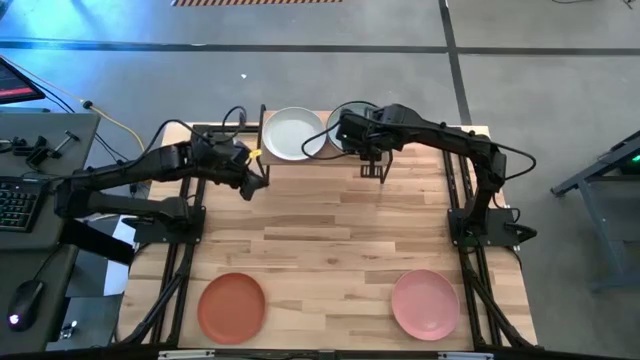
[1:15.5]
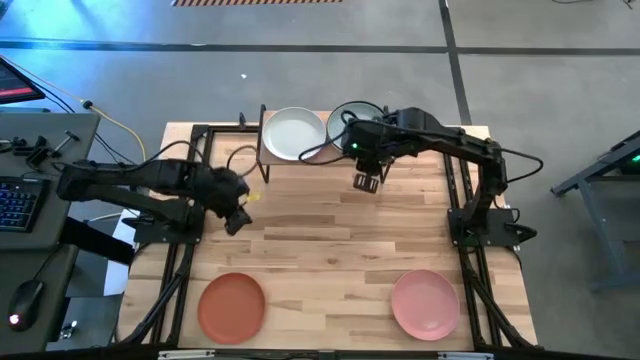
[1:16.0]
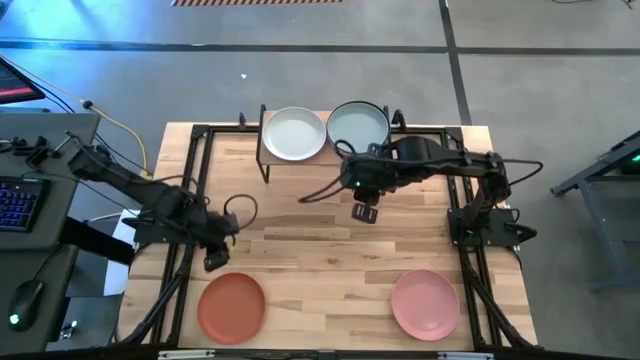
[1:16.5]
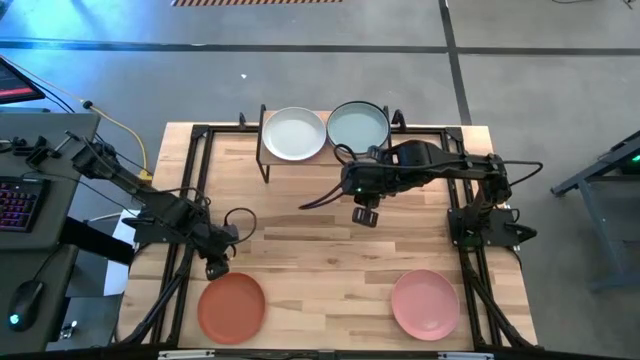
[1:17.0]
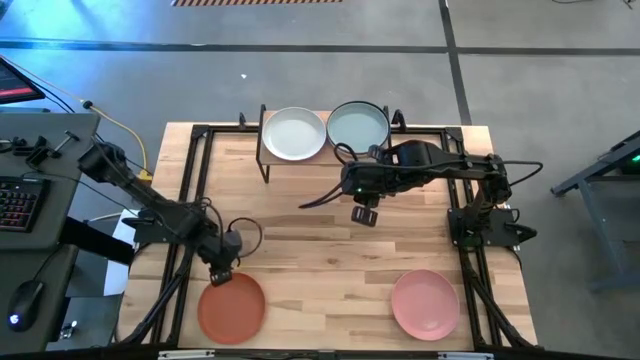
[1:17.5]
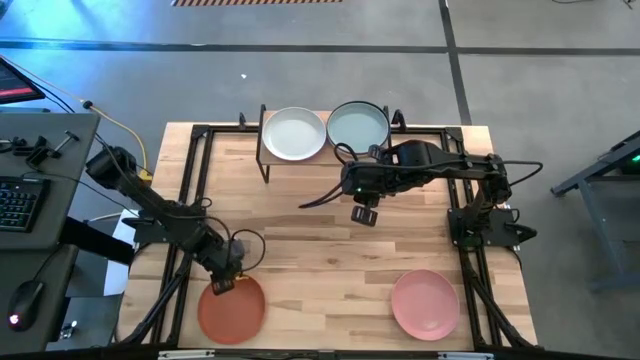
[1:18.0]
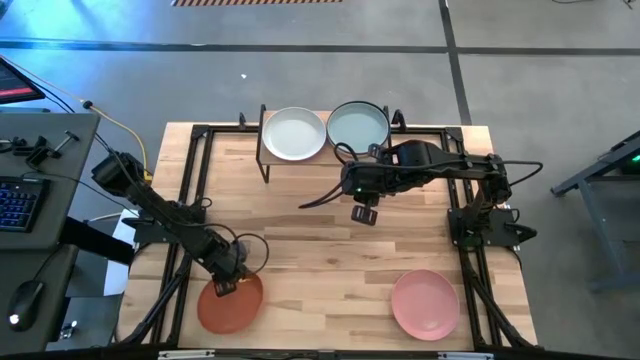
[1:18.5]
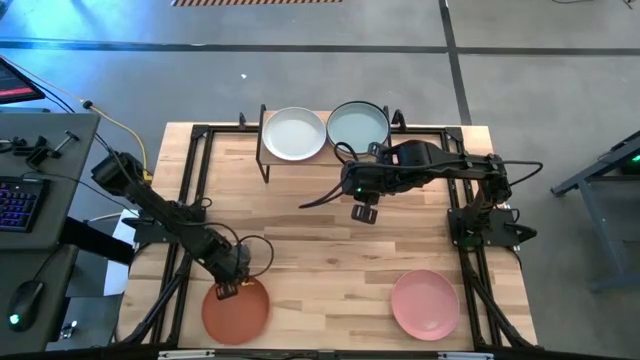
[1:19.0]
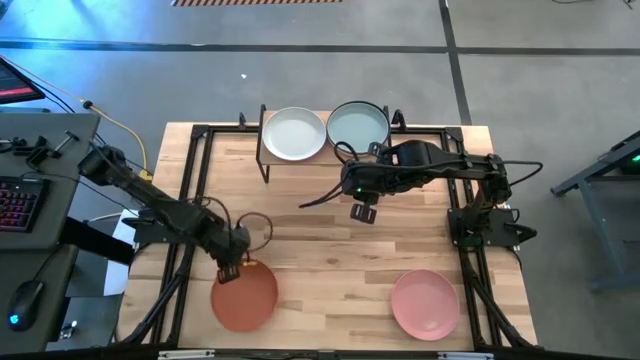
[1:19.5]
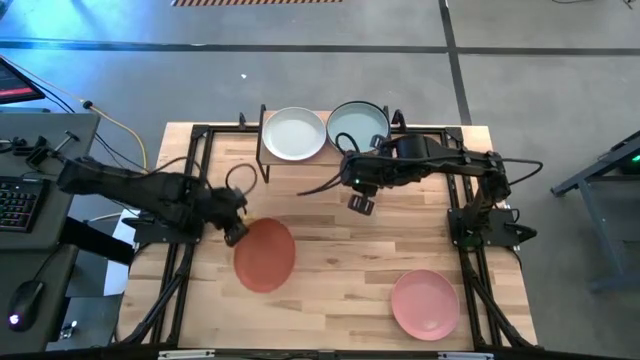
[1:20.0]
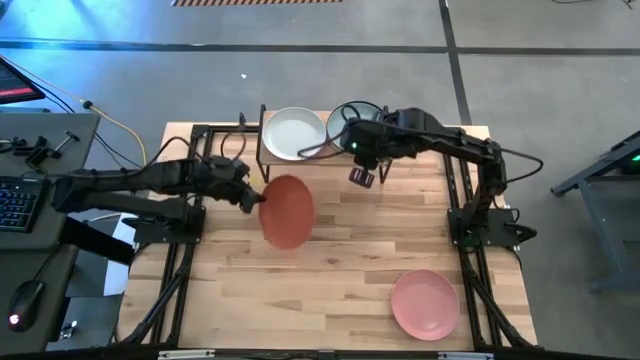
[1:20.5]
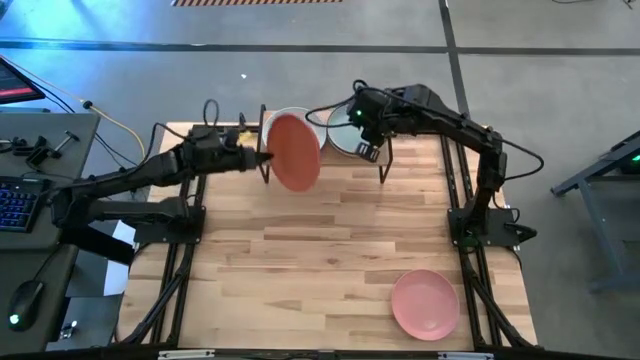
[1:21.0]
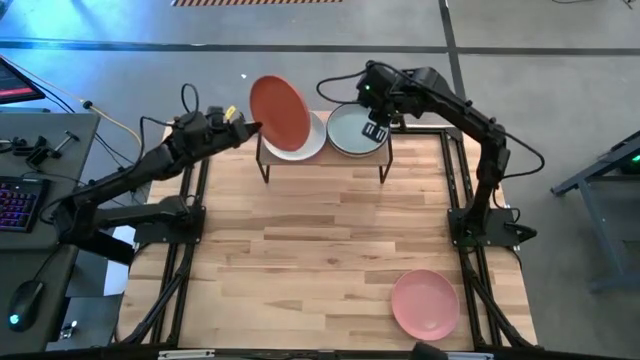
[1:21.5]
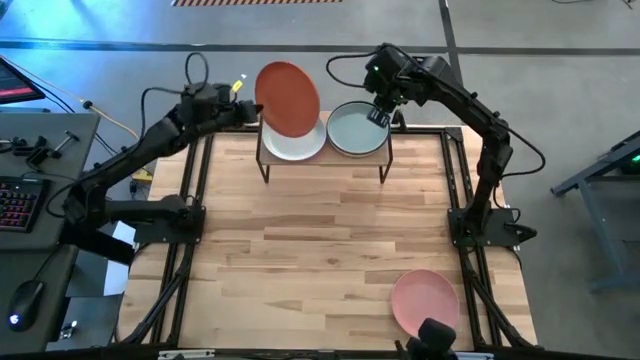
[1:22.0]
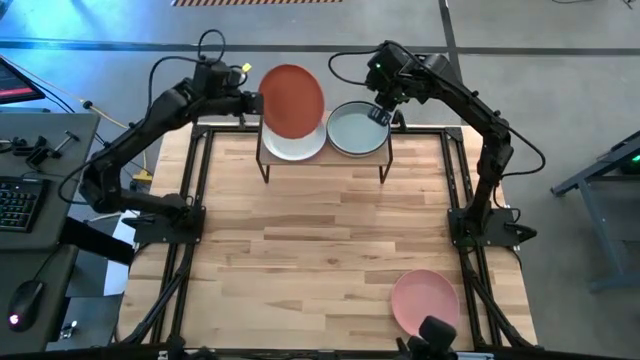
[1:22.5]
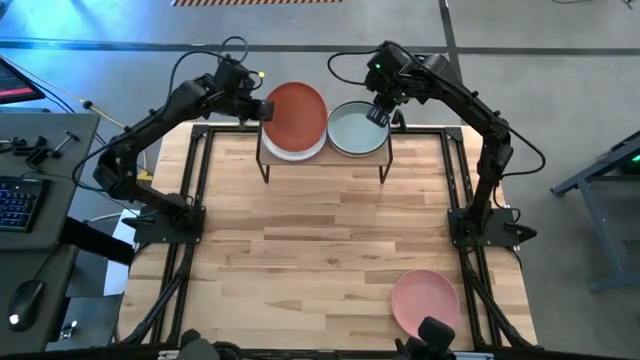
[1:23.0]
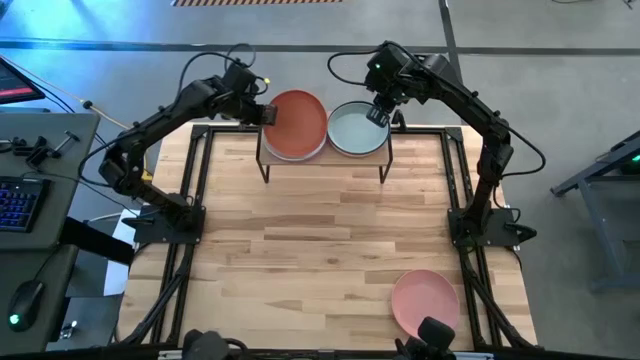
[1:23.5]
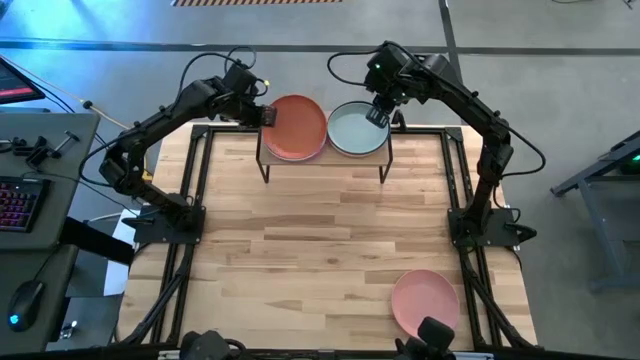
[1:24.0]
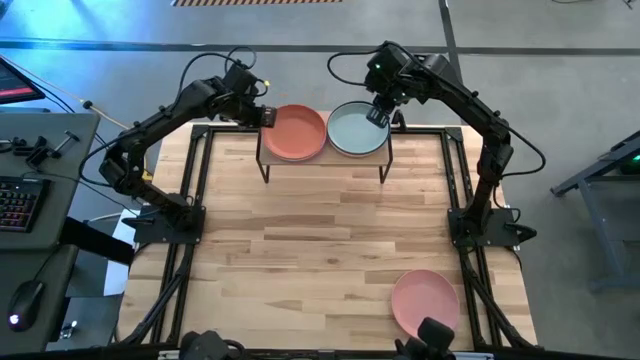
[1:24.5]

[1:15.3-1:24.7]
Task: Place and stack plates onto a shelf
Stack the orange plate on top of the gray plate on the shelf

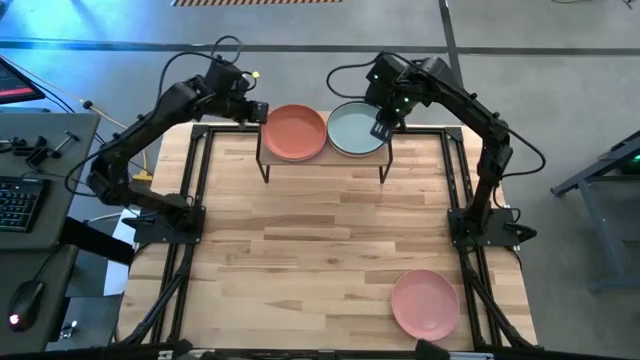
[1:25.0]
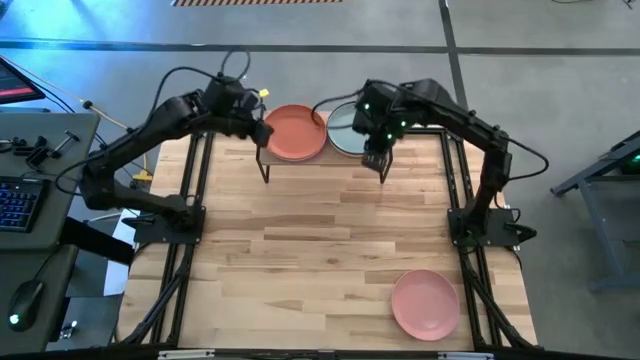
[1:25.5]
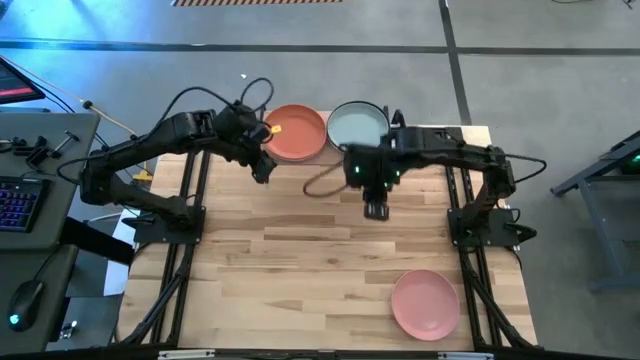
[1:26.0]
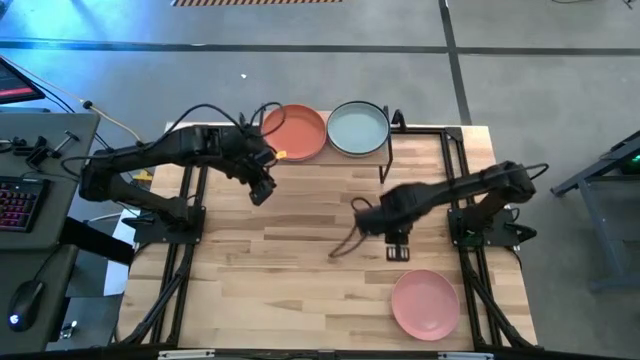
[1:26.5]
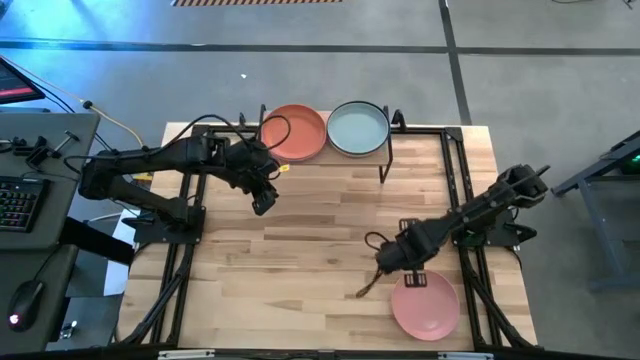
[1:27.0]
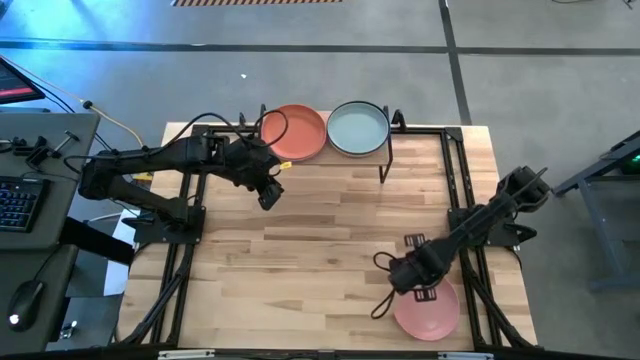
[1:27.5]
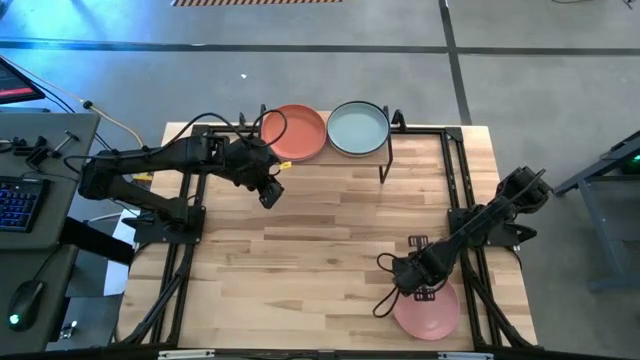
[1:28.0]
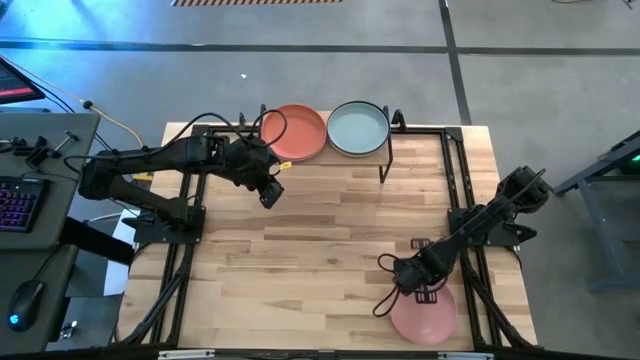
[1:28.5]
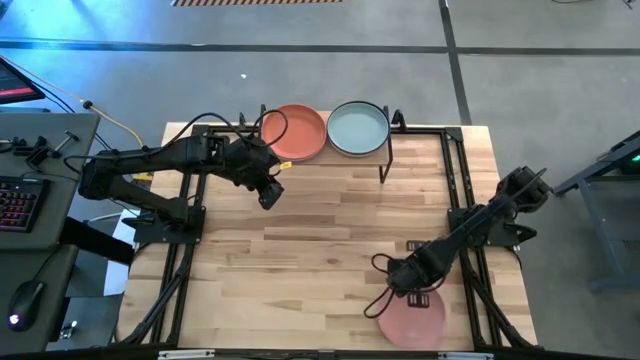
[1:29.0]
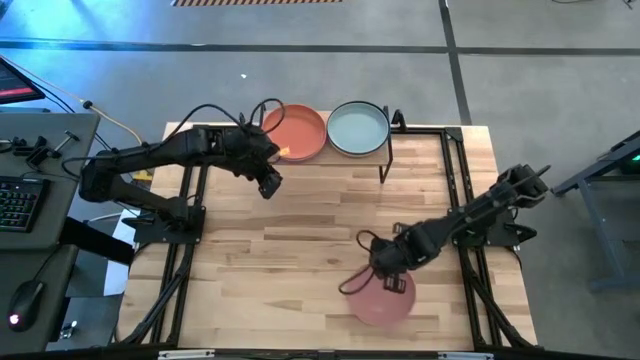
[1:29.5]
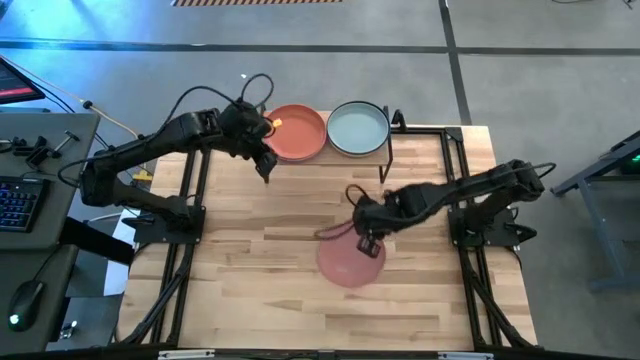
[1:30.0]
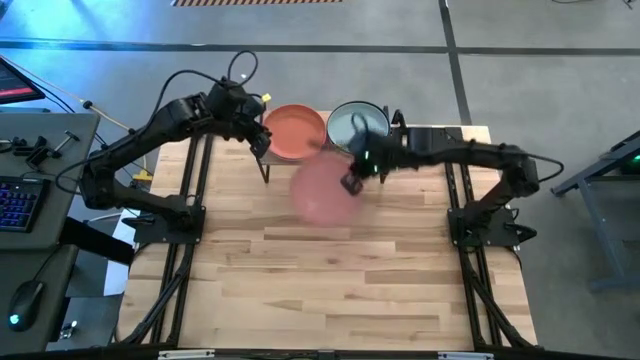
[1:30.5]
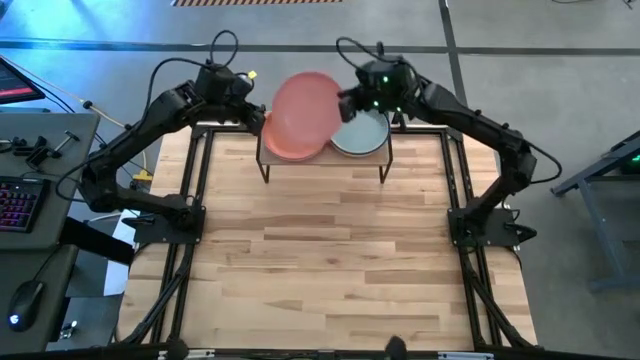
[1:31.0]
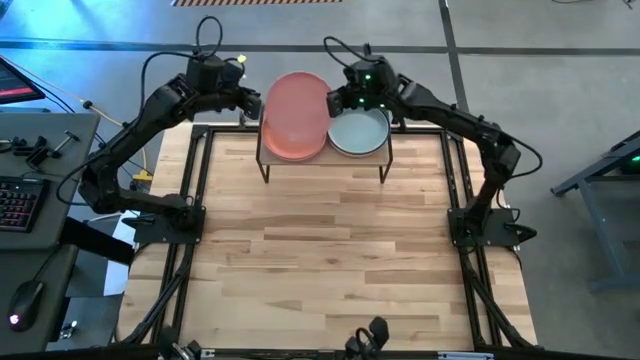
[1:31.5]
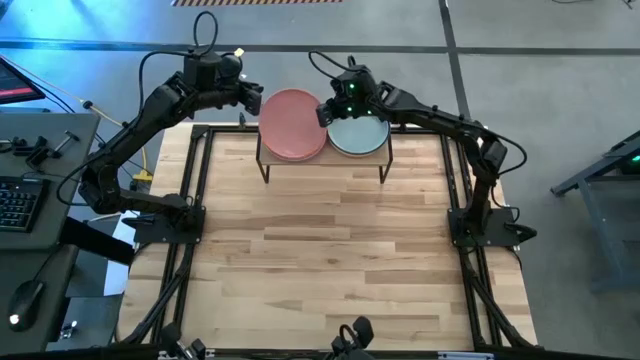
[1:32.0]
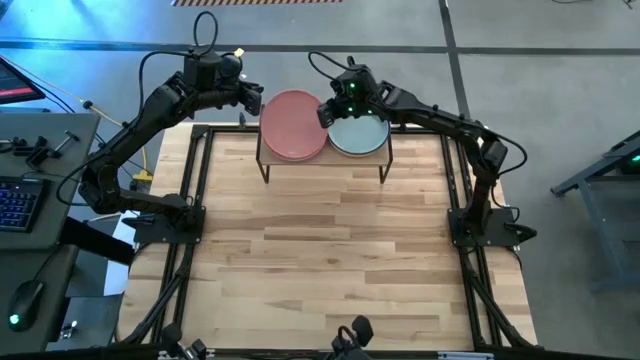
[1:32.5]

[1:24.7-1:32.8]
Stack the light pink plate on top of the orange plate on the shelf

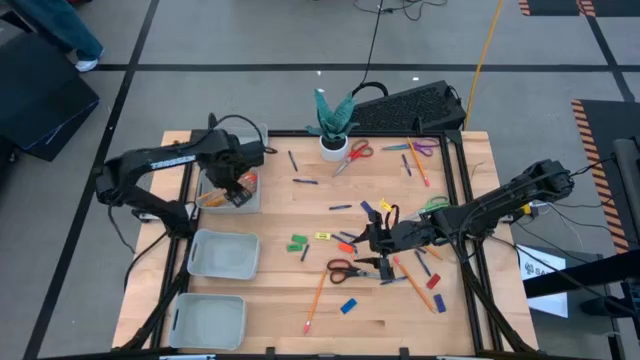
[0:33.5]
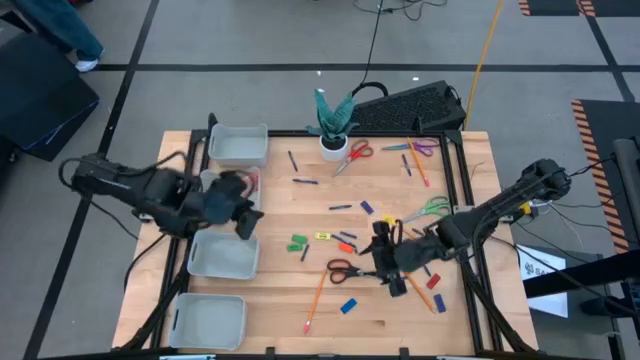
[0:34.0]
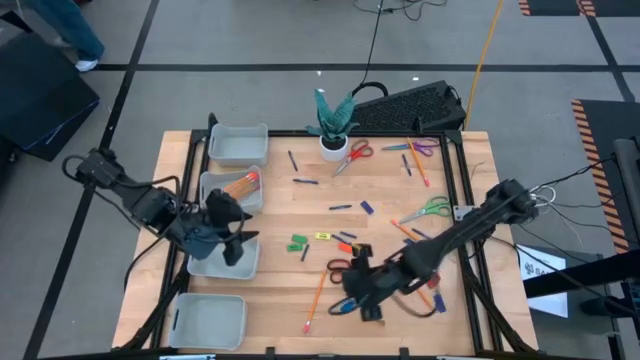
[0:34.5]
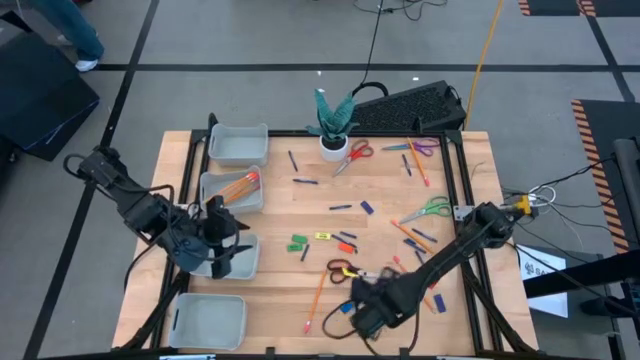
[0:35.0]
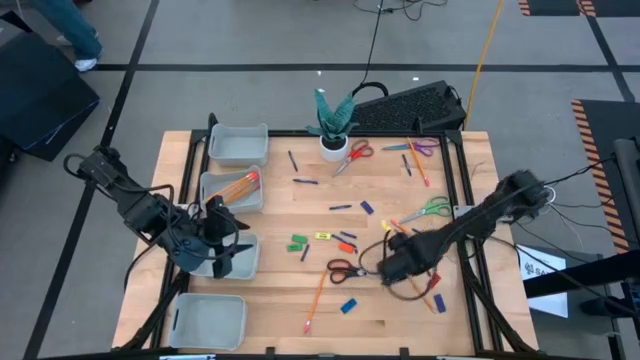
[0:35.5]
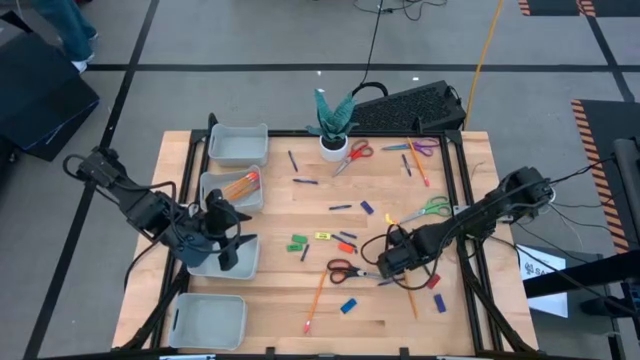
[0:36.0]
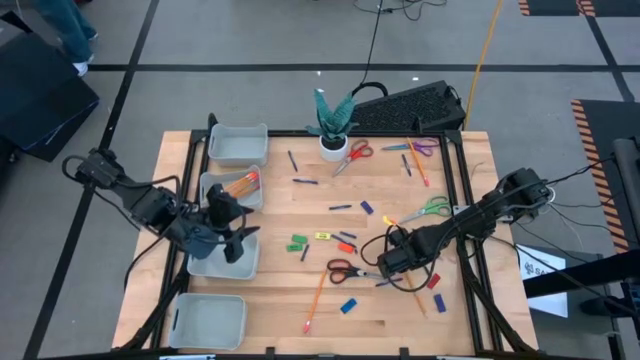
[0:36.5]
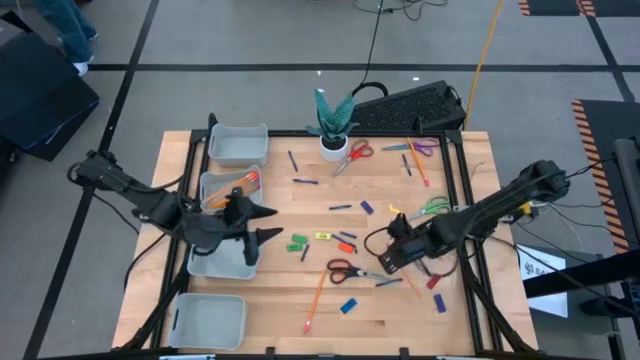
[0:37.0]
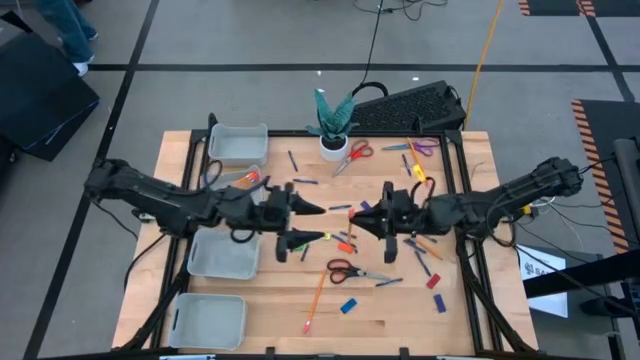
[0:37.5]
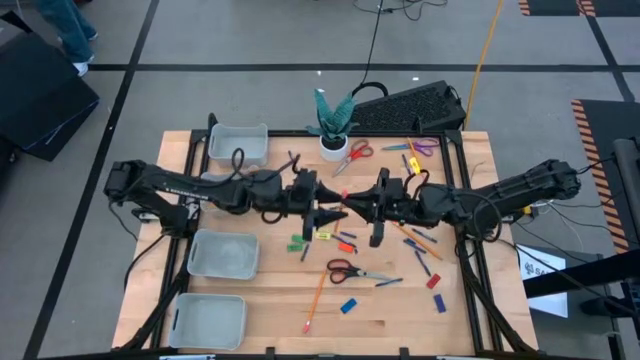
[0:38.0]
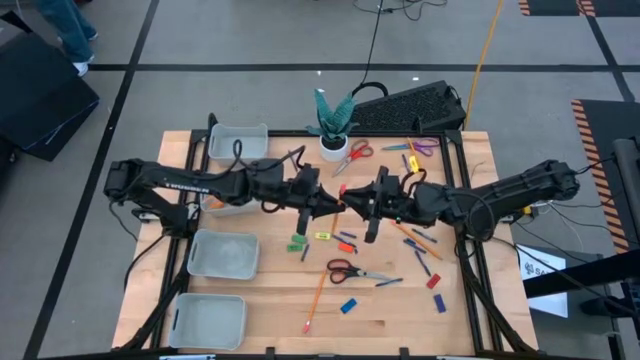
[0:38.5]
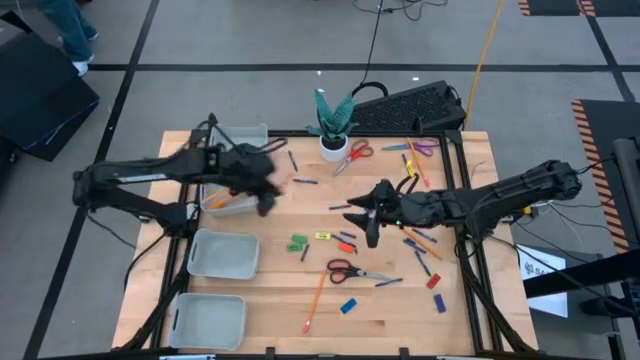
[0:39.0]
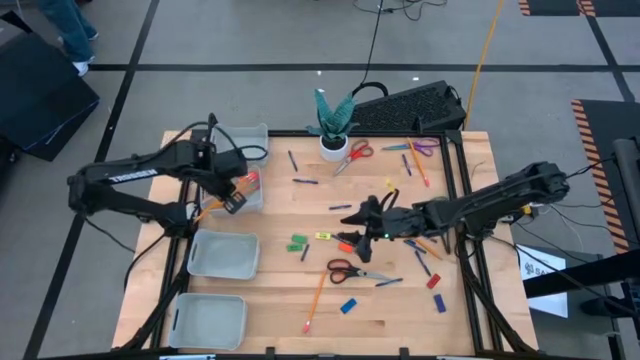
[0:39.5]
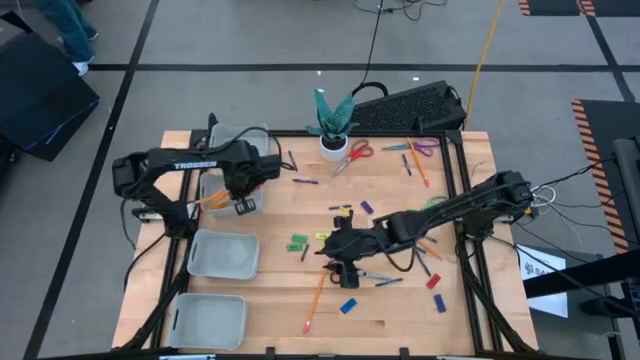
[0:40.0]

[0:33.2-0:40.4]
Task: Sort crayons/erasers/pens/pencils in bins
Put the orange pencil into the middle top gray bin
